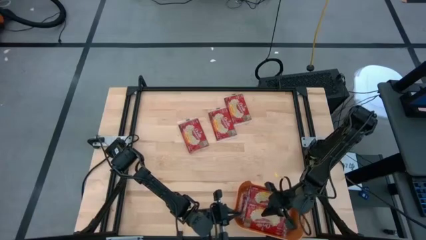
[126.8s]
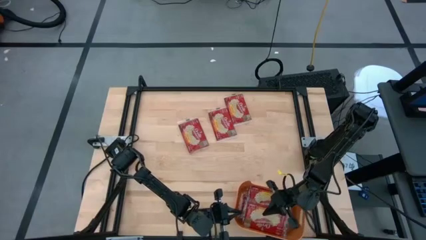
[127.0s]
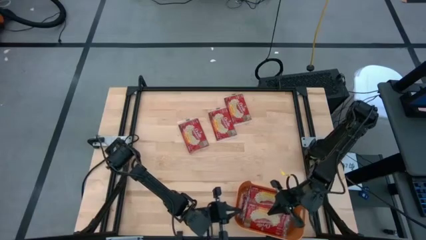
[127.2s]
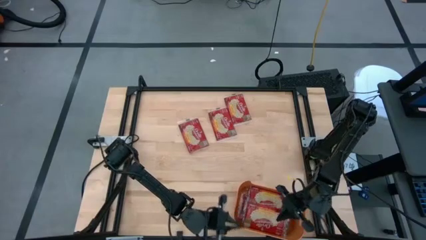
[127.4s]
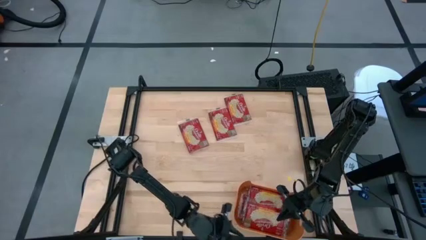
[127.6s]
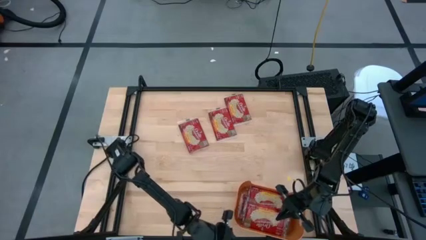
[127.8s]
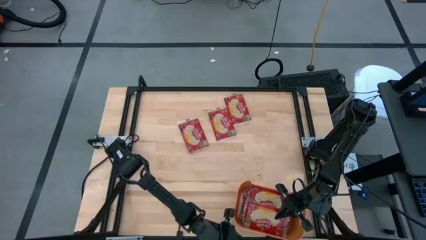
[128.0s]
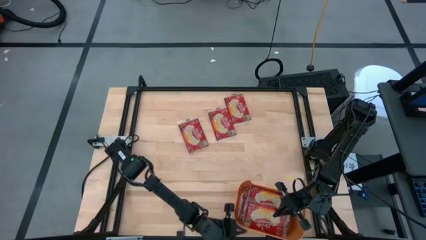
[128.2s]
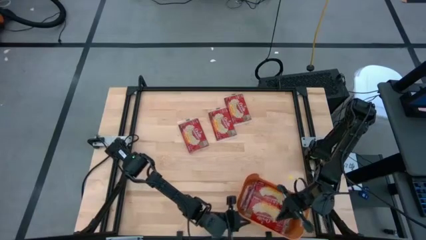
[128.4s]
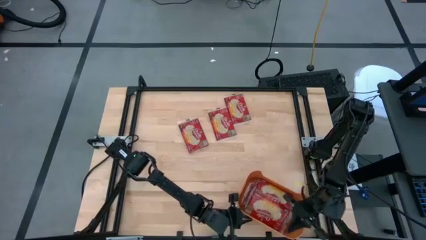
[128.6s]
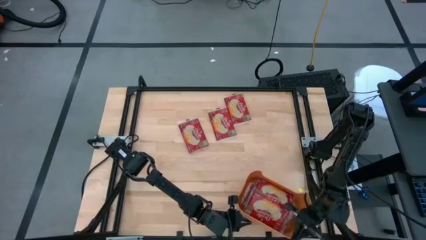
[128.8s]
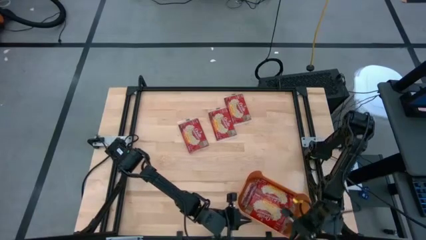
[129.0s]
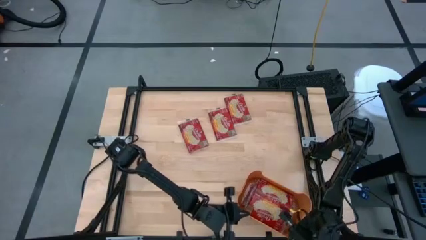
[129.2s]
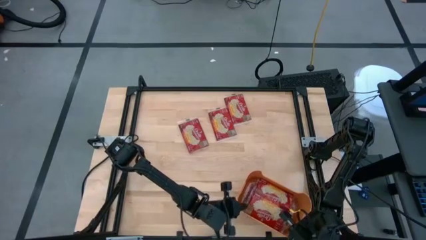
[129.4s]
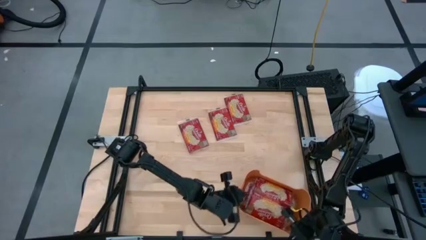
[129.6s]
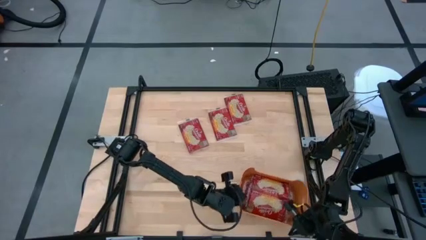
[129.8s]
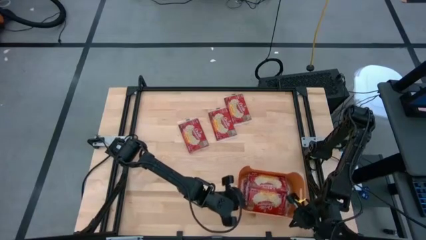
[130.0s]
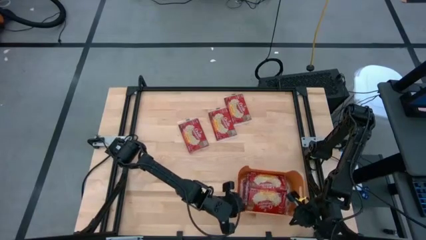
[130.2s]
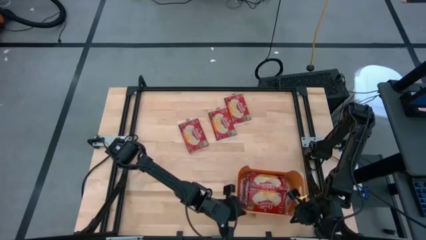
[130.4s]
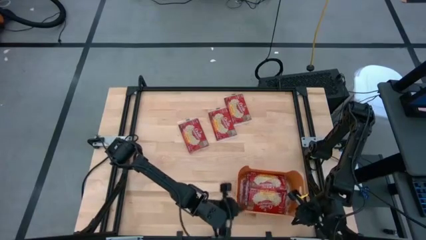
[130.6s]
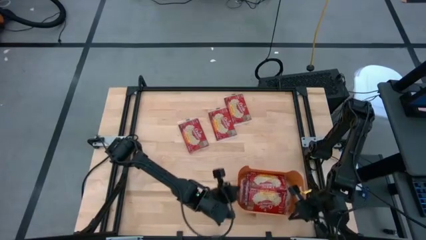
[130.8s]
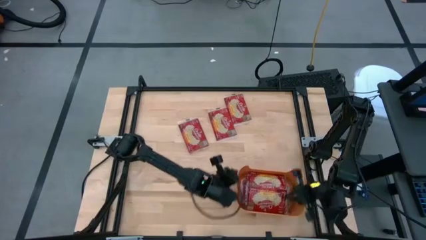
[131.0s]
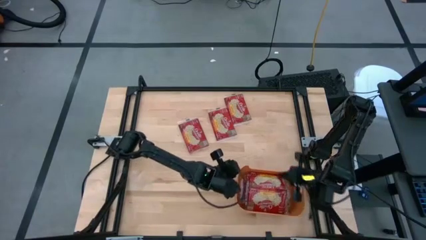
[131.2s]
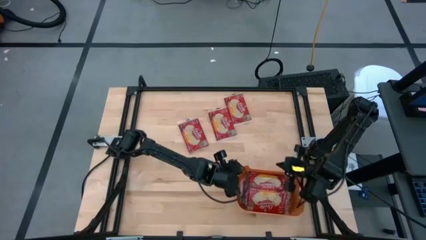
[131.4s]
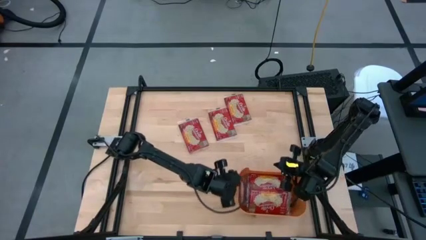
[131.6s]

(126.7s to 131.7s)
Task: Sort popcorn bags into baskets
Adjust the orange bin

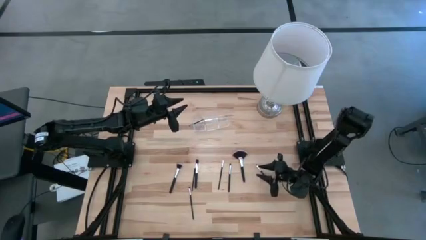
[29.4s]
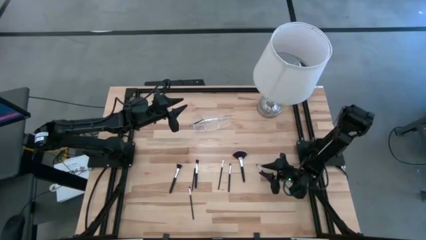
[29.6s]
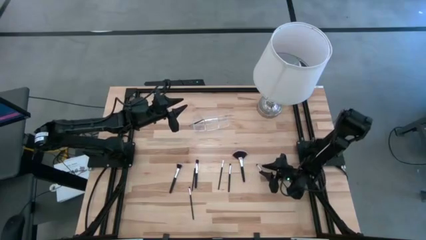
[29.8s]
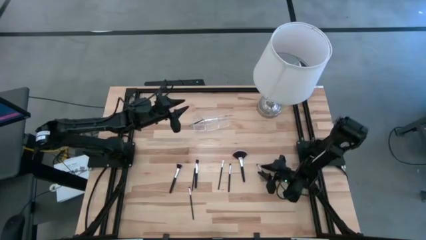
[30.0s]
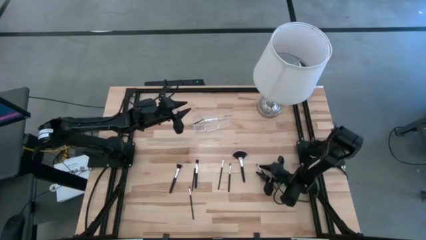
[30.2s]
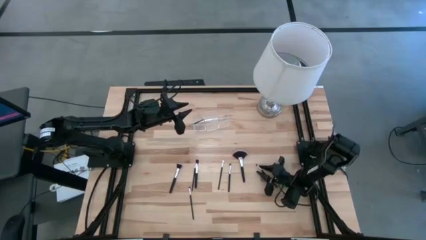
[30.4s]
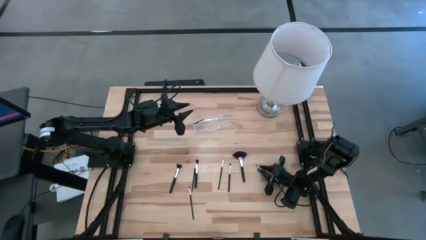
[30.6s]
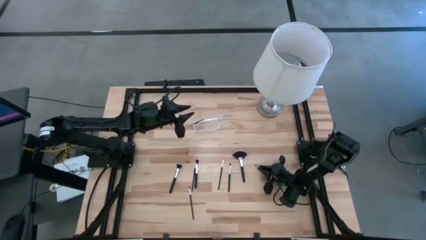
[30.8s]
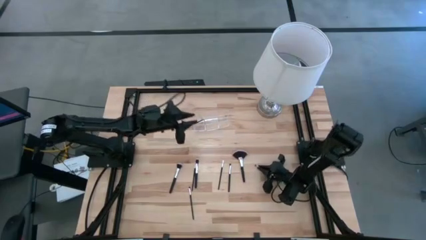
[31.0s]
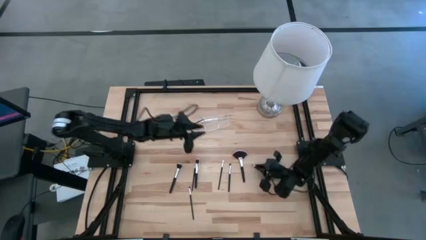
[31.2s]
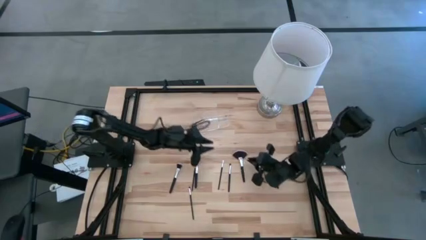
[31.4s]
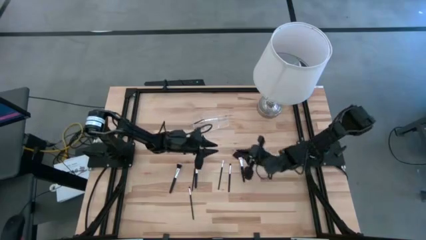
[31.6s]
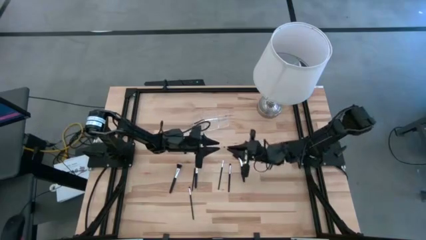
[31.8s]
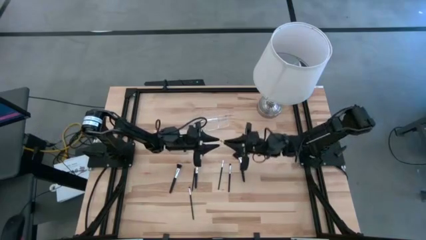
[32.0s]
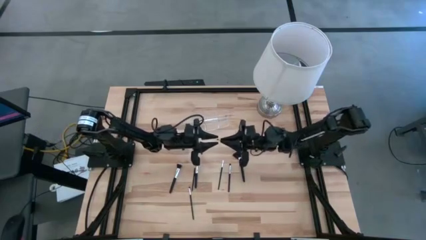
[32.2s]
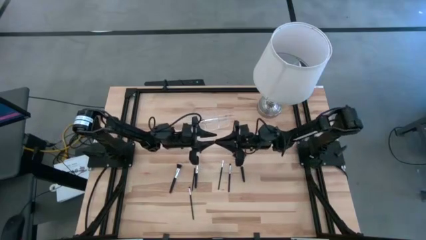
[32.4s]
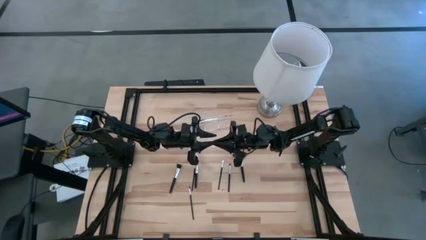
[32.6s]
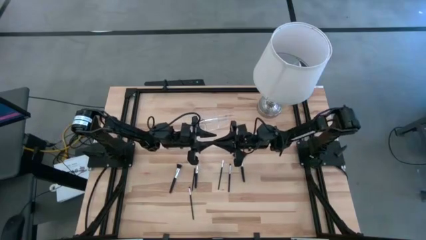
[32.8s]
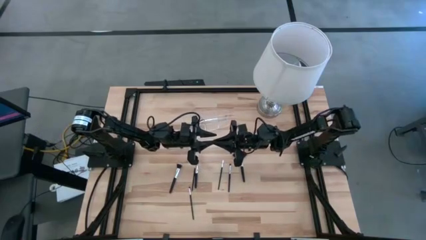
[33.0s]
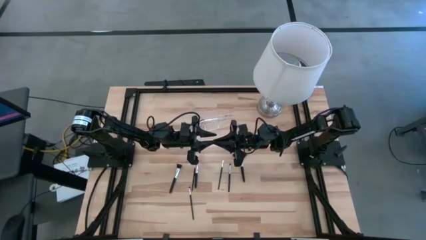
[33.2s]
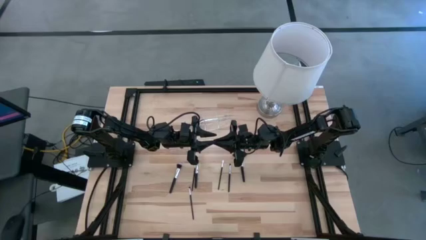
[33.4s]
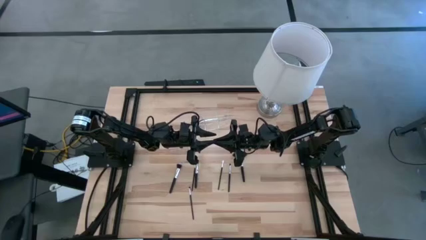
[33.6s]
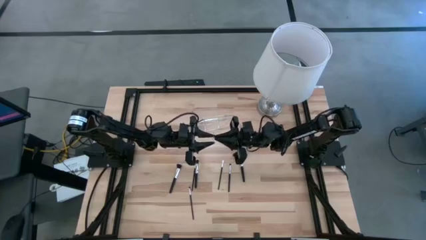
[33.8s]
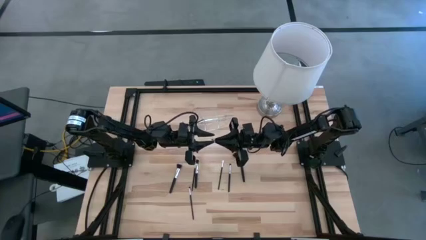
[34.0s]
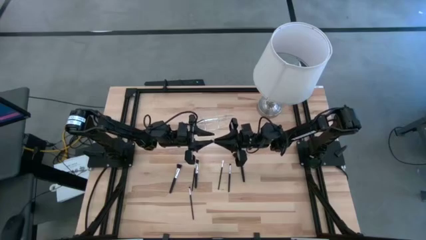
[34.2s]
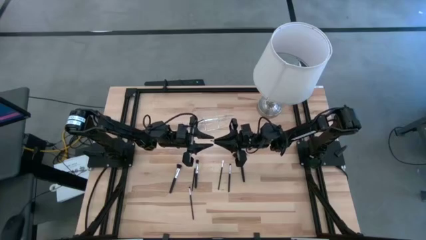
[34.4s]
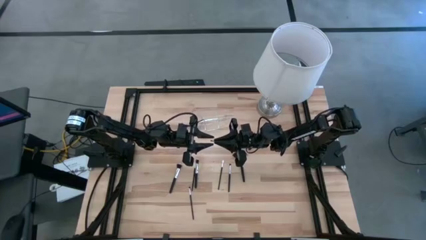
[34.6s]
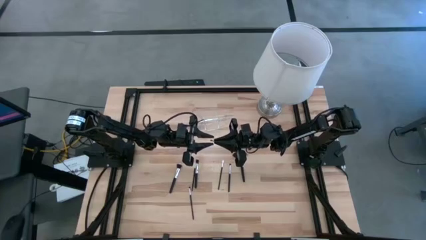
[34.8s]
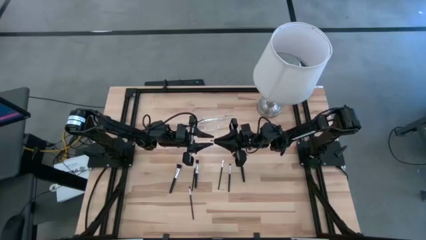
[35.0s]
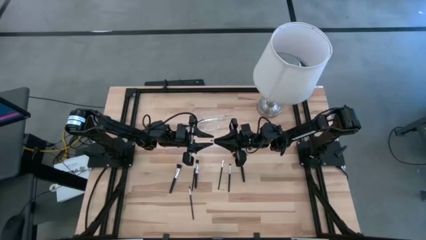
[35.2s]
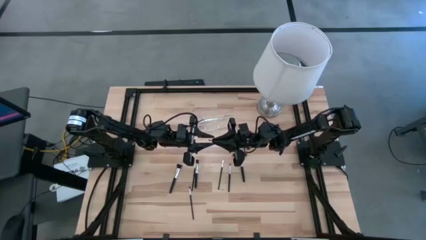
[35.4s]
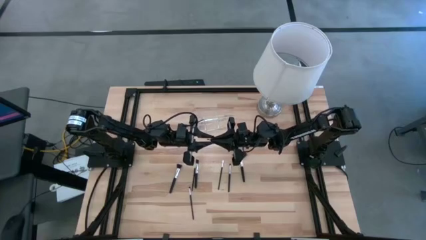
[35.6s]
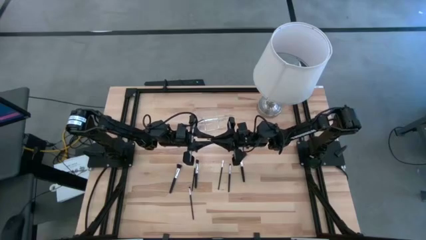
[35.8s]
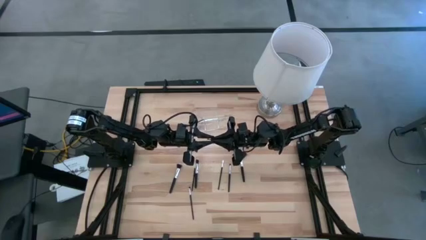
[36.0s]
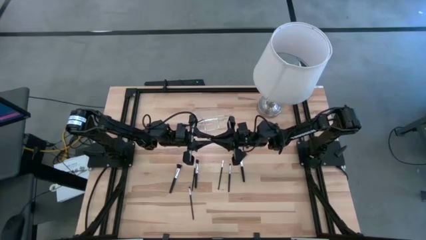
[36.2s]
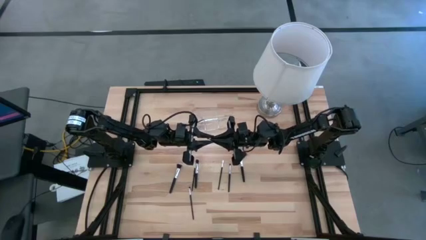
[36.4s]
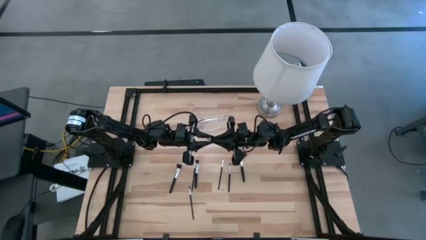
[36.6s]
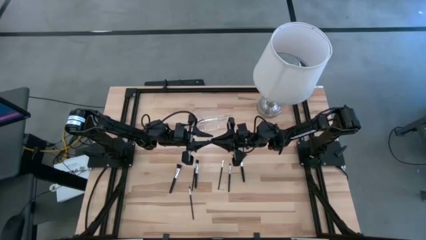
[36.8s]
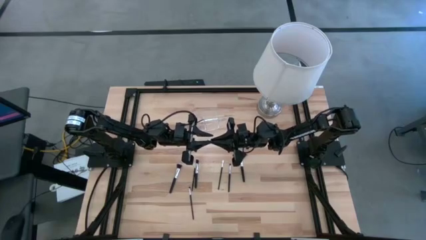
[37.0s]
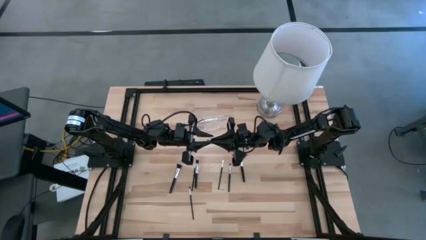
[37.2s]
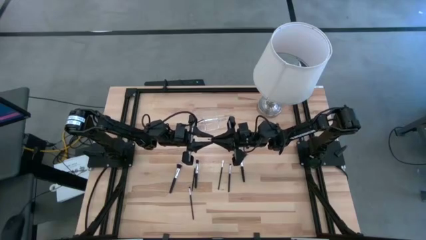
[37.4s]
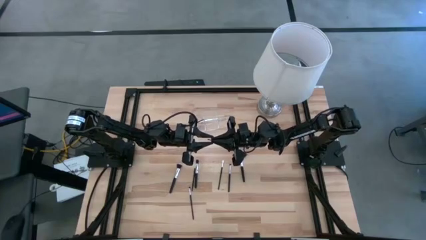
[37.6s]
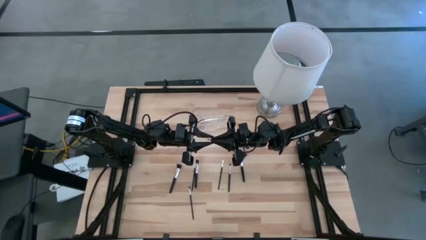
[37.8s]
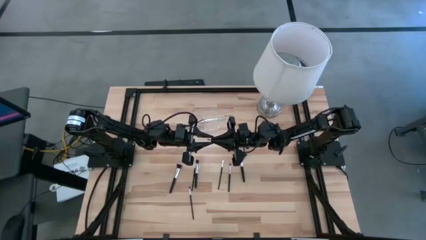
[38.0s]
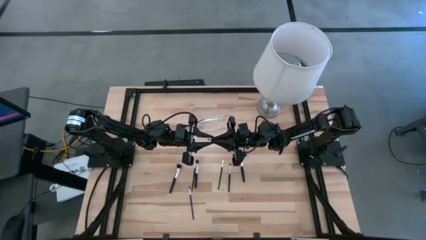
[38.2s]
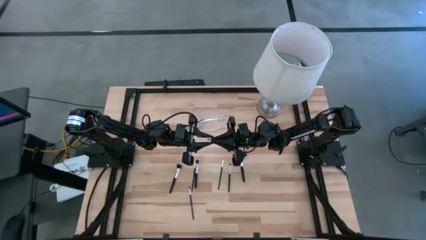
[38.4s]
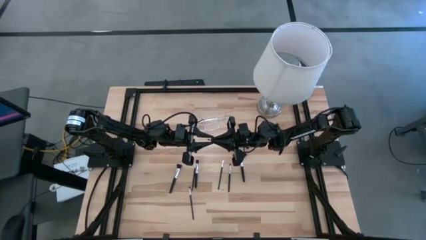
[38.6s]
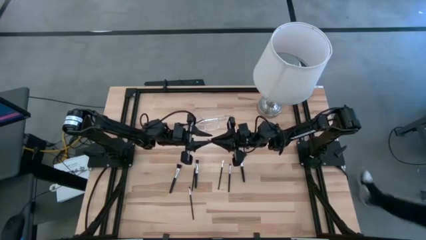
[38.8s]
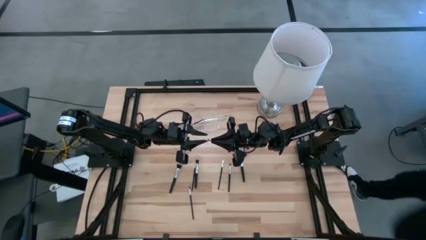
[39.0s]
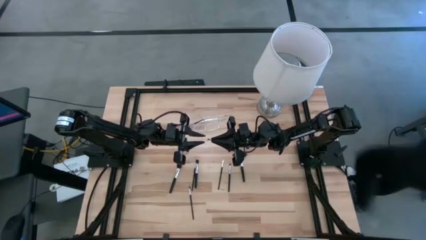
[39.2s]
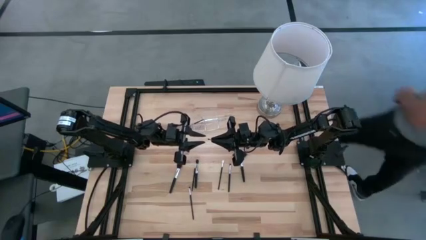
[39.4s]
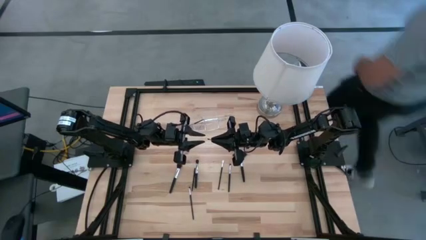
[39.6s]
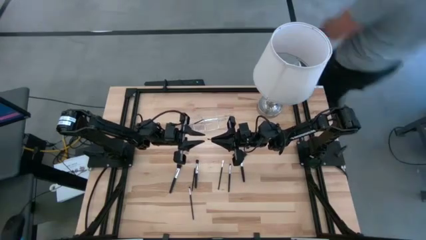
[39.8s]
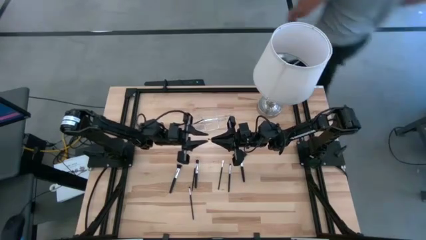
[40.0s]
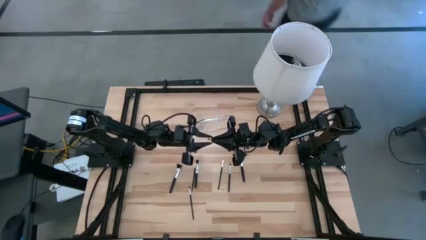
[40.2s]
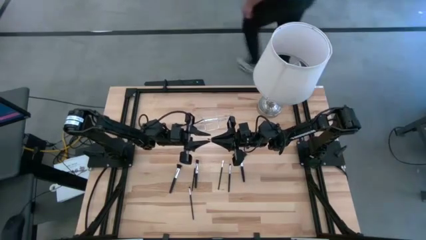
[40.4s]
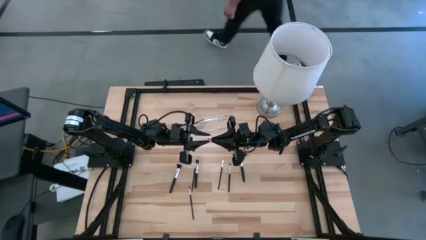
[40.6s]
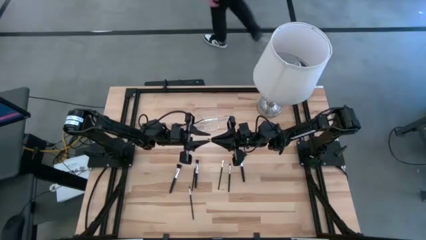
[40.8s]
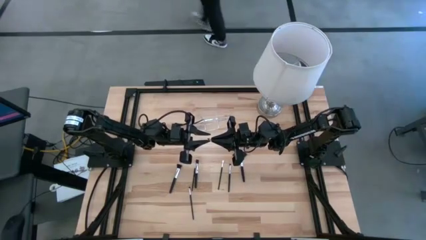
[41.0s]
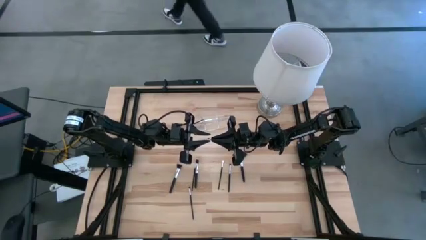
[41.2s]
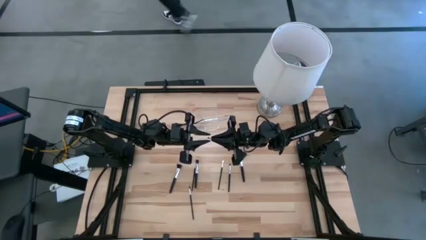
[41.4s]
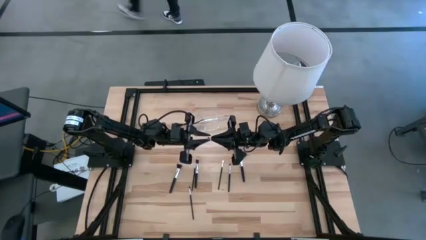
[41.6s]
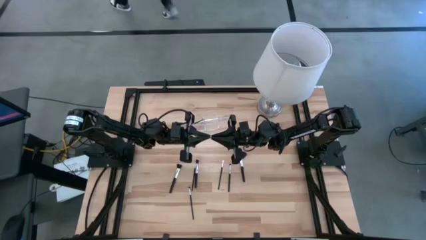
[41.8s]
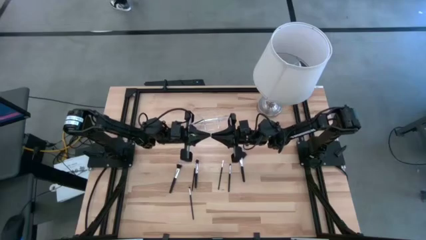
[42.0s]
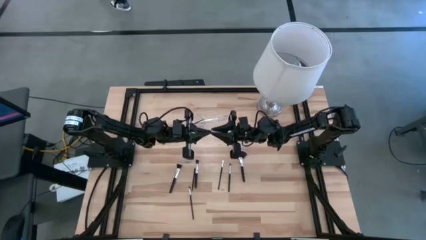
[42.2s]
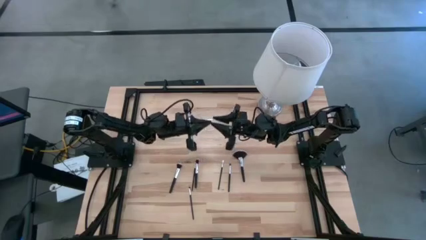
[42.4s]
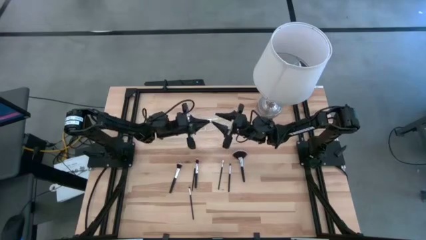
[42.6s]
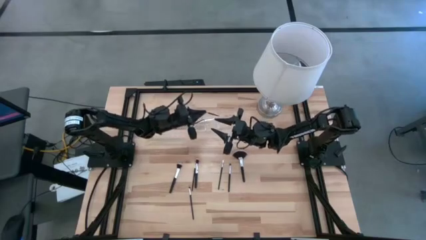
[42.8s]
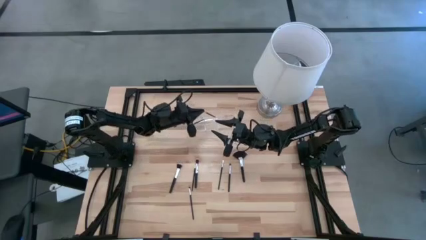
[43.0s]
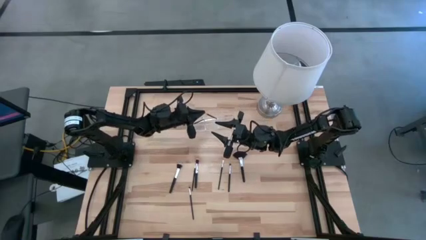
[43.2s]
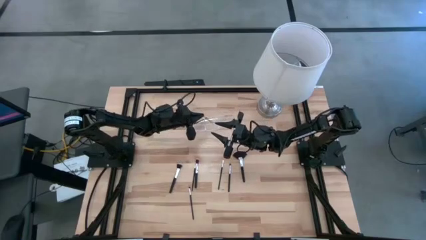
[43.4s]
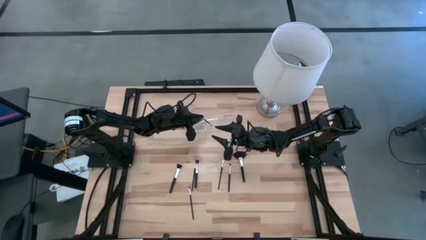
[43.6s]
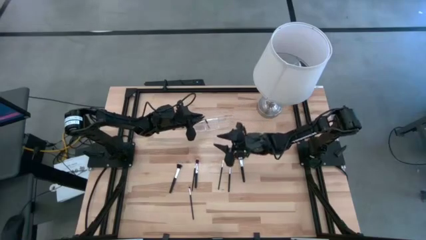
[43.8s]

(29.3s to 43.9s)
Task: Sort items
Put the right black eyeshadow brush into the transparent organizer
